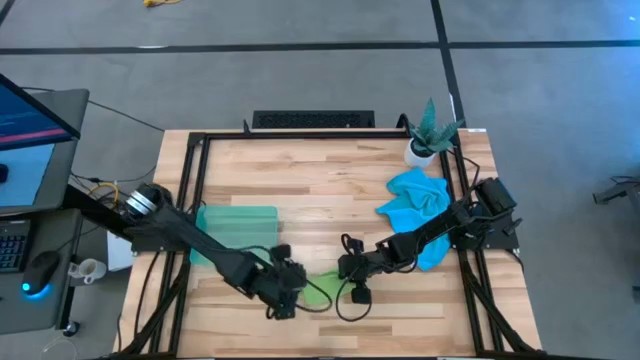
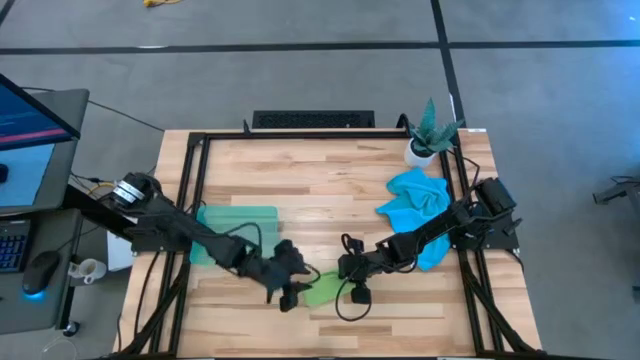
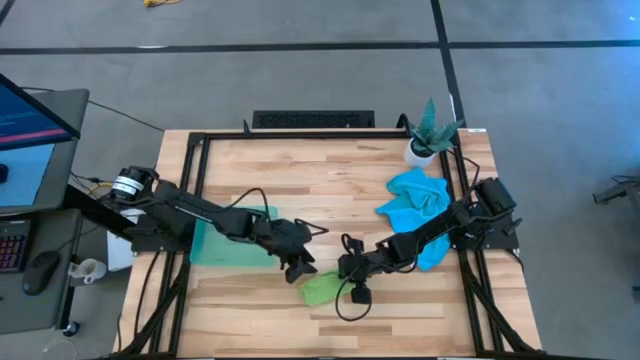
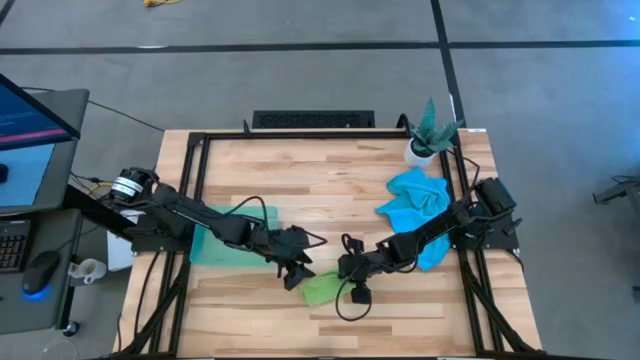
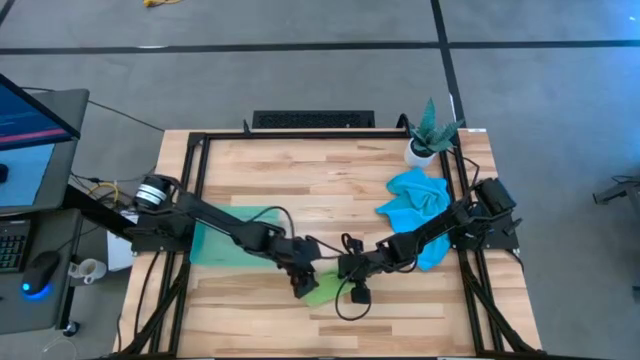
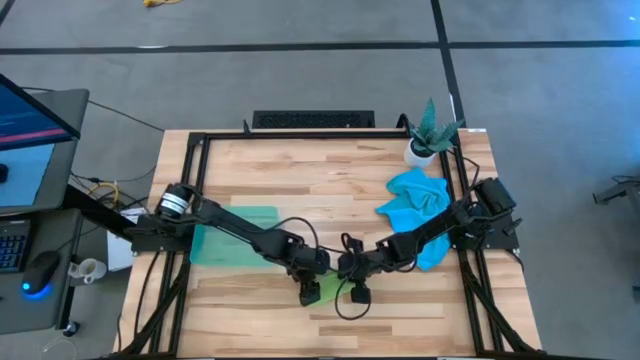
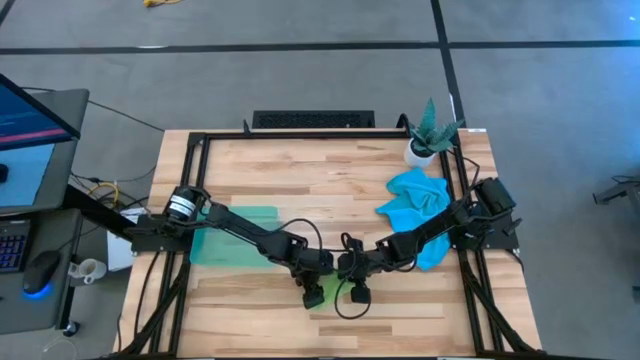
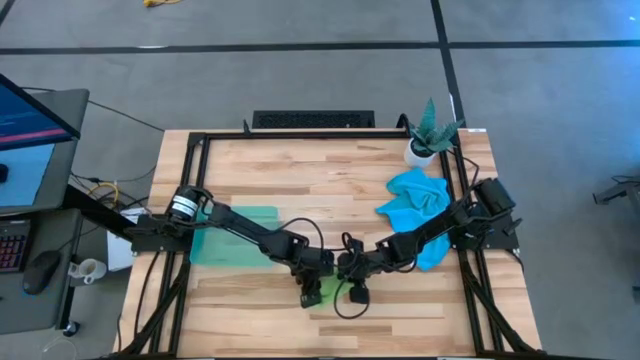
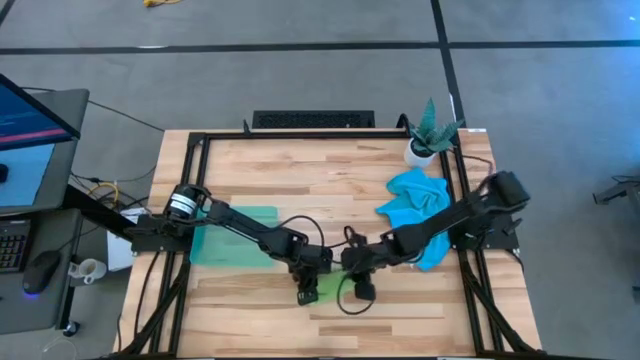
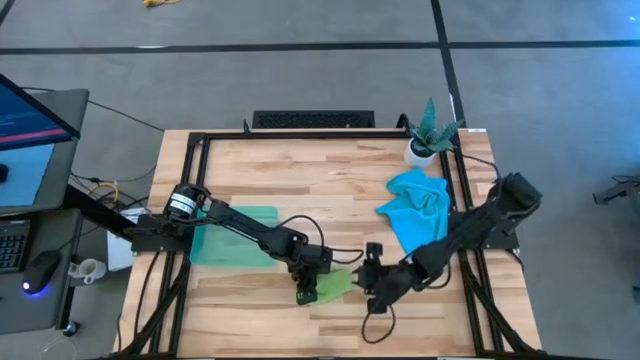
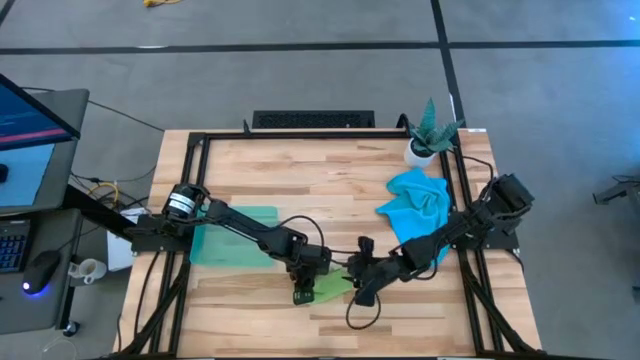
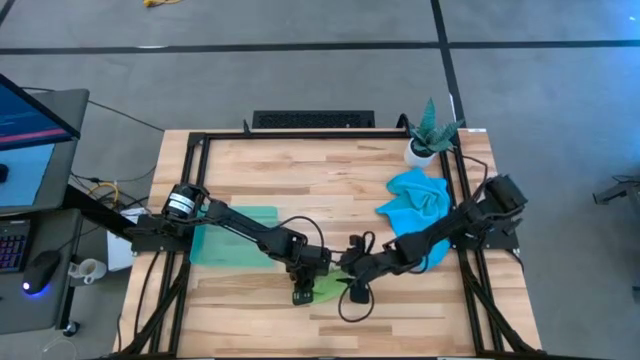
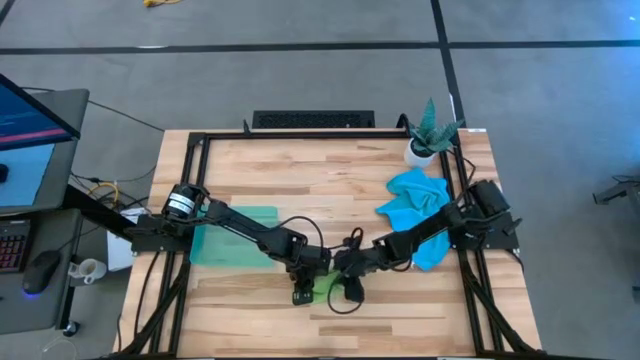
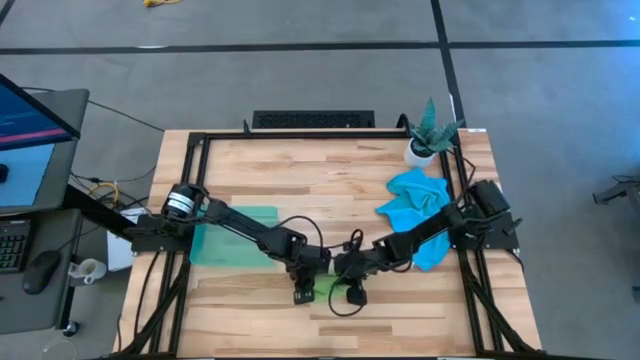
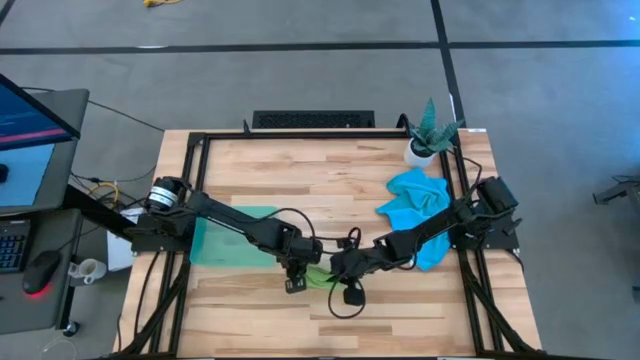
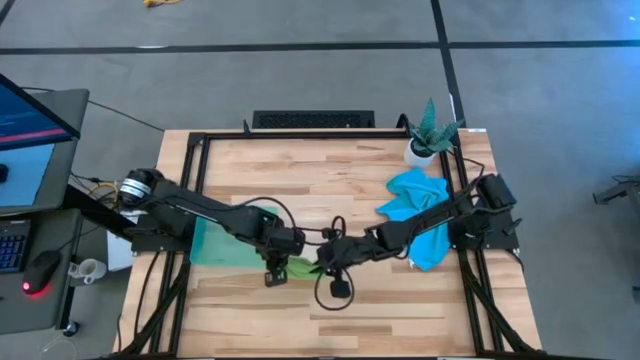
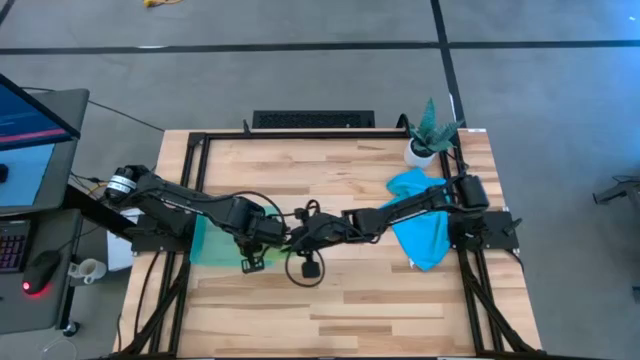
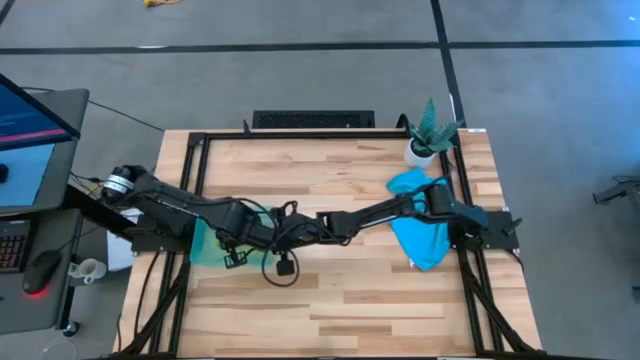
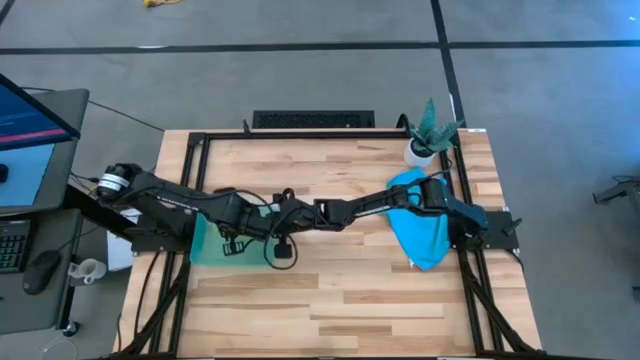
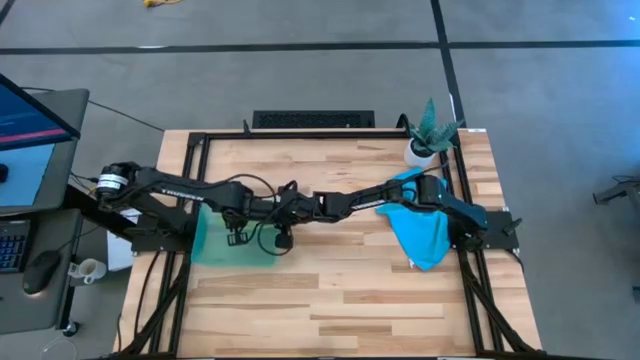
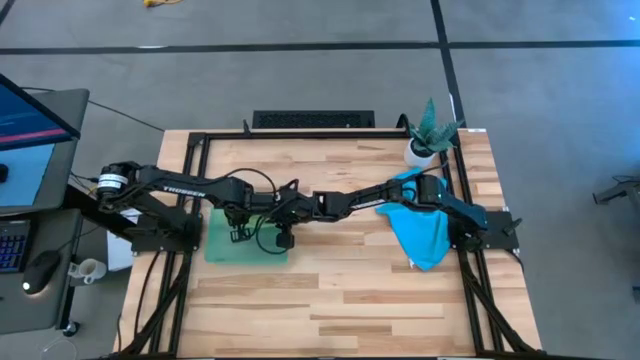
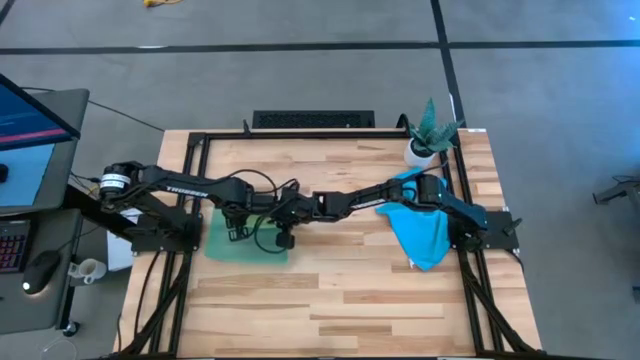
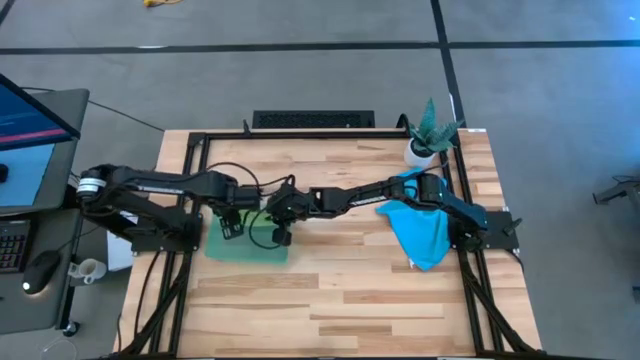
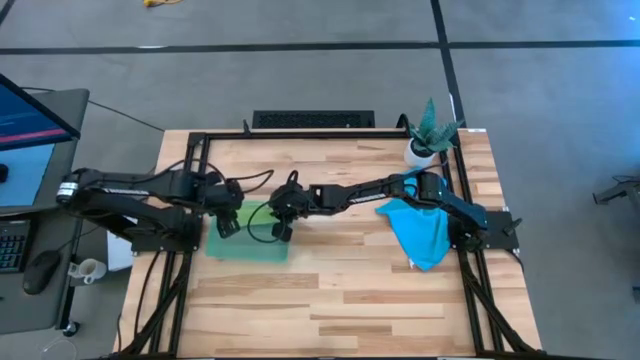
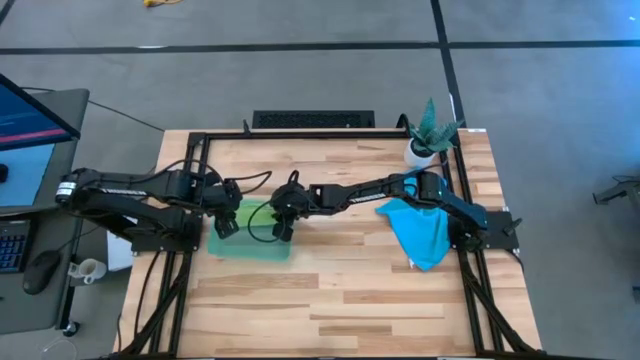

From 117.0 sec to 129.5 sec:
Task: Roll microfiber towels into tight, uniform cylinder then place into a basket
Put the green towel into the green bin

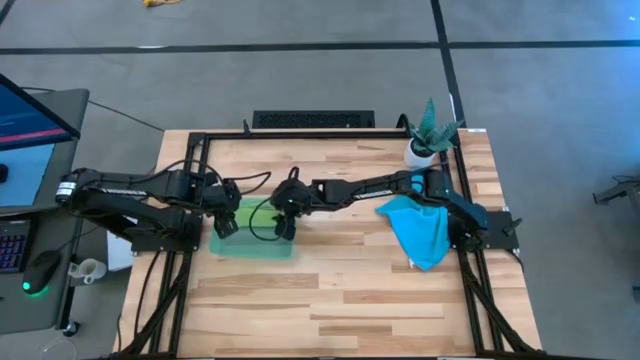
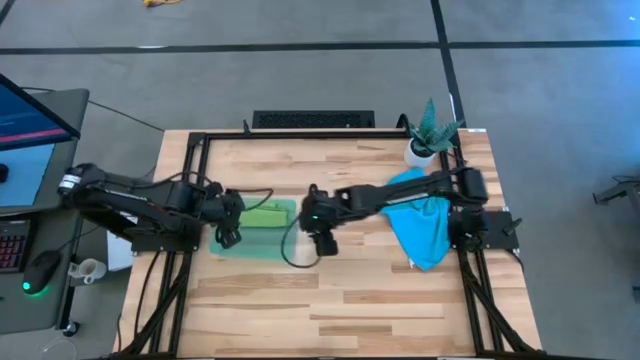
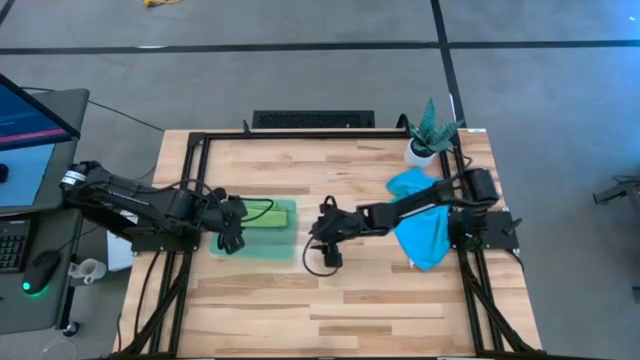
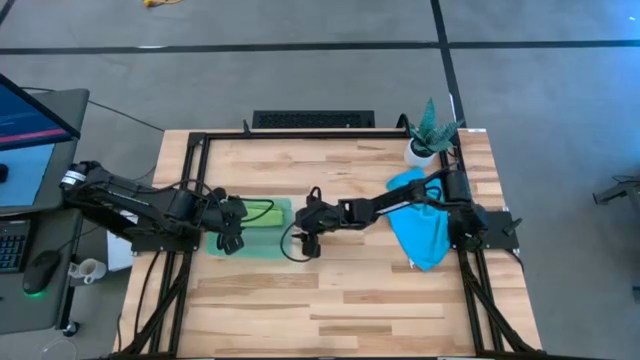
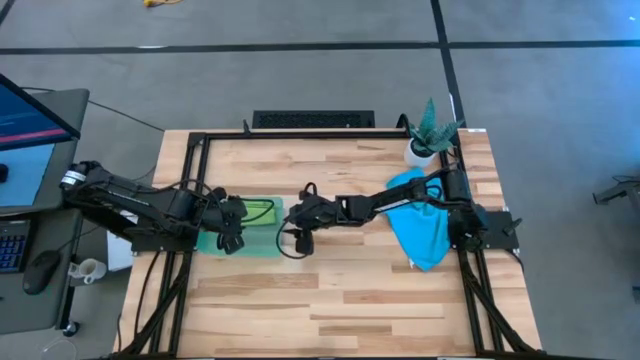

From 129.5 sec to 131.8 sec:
Adjust the green bin

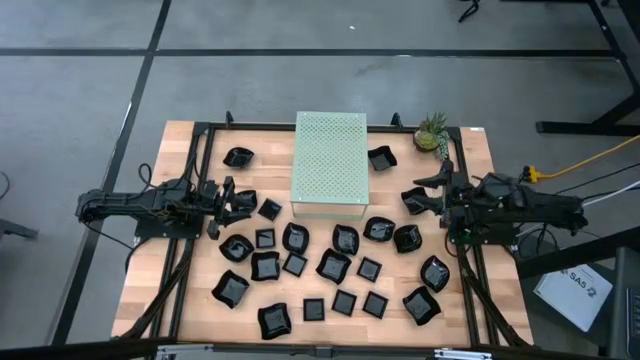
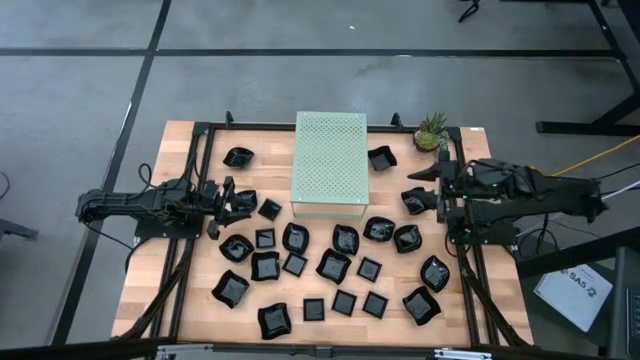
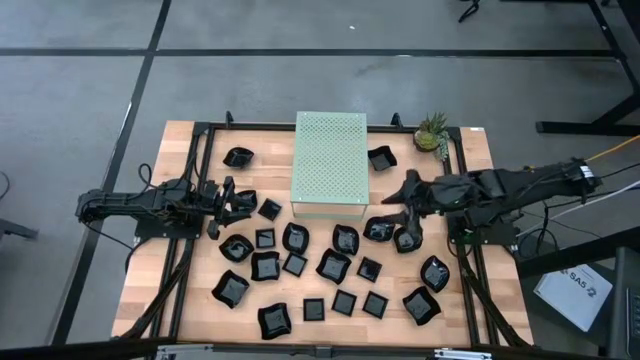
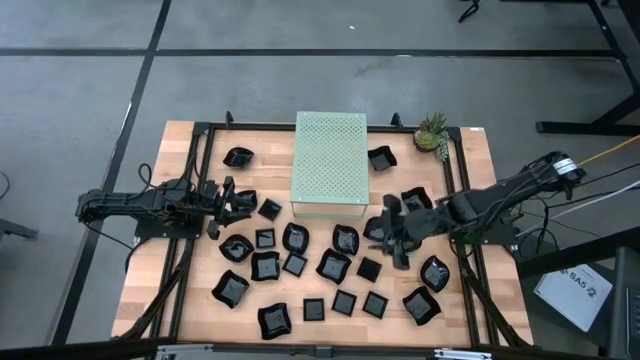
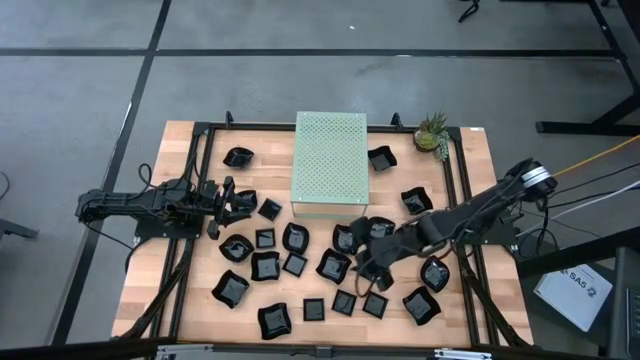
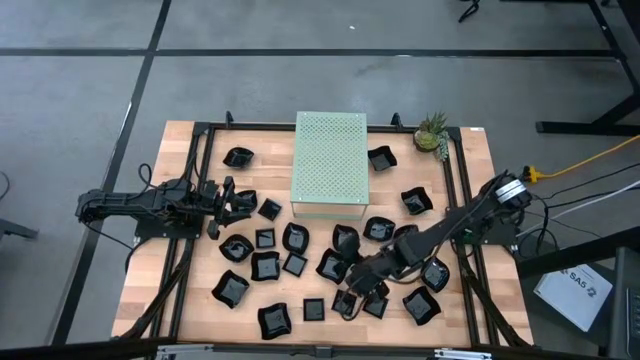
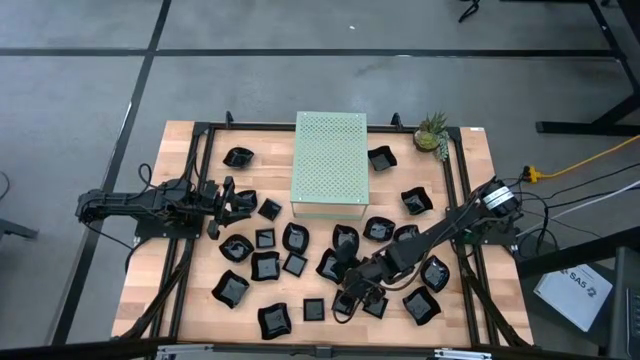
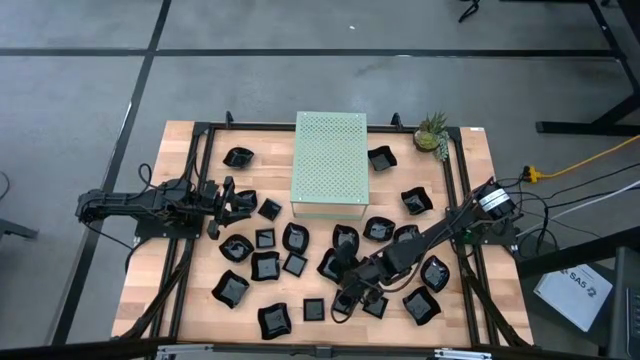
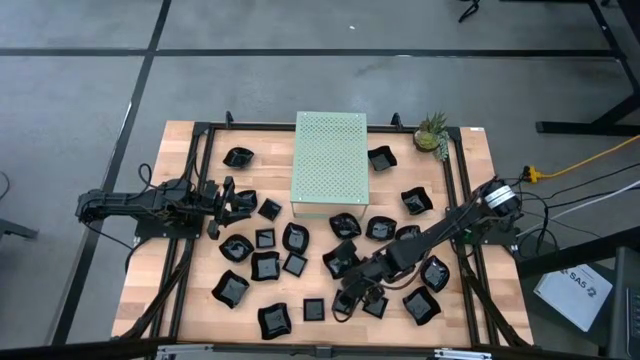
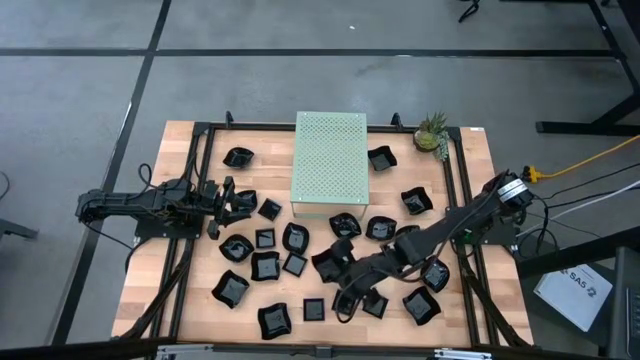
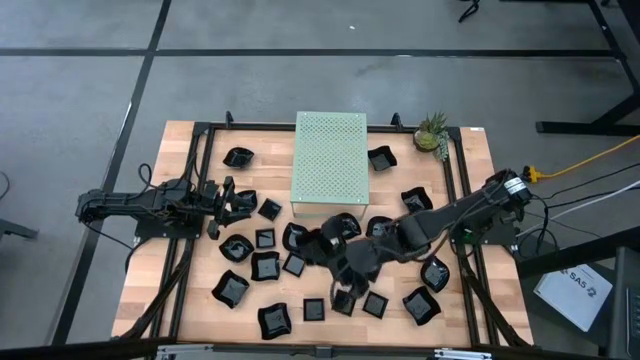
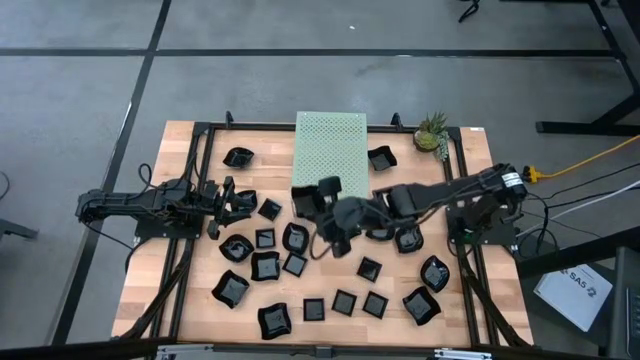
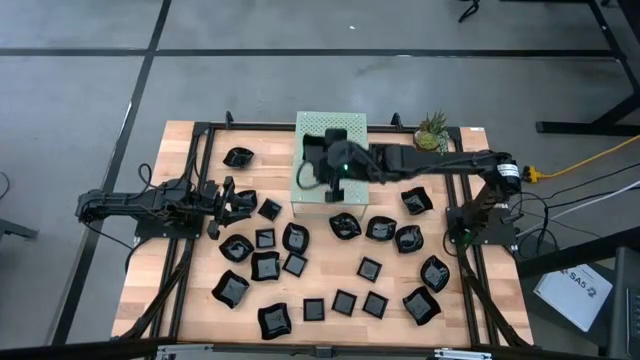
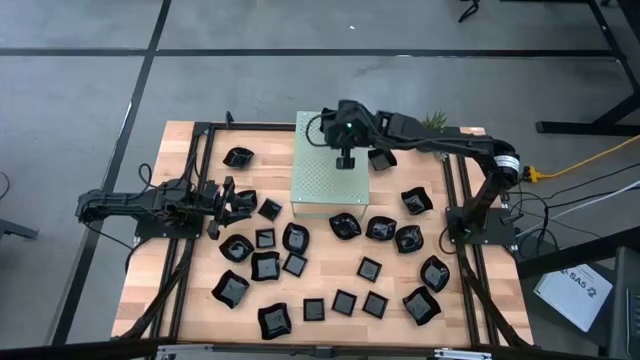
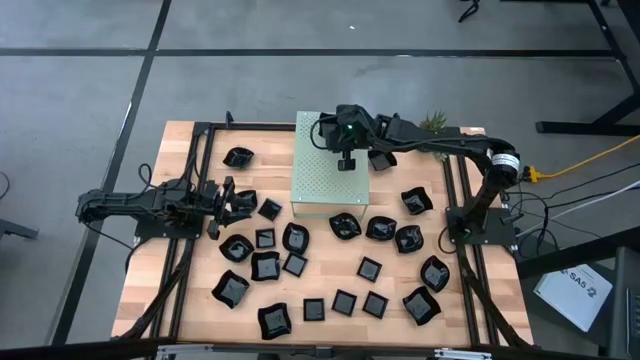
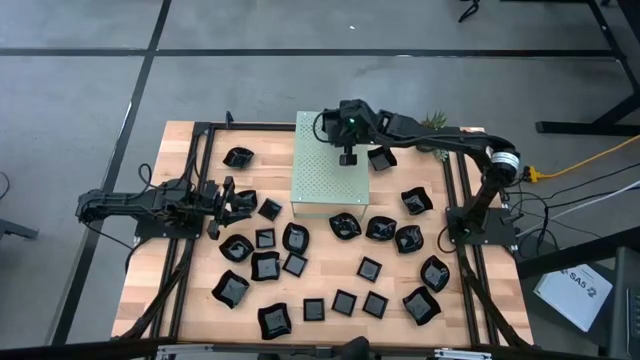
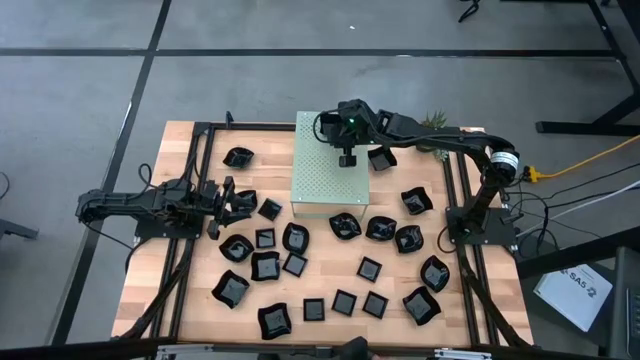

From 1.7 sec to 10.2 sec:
Task: Pick & Place Mini shaped plates
Put the black distorted square plate on the shelf
